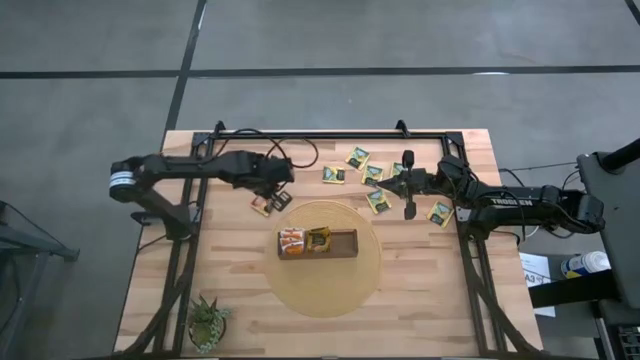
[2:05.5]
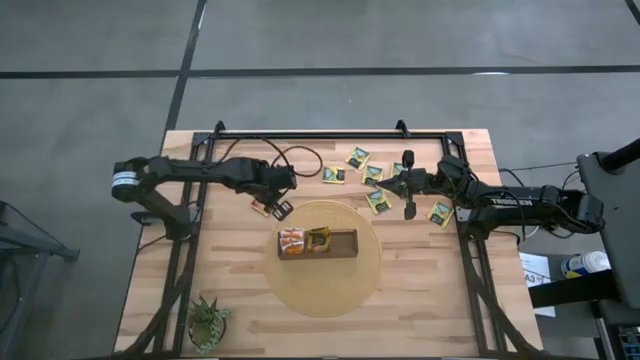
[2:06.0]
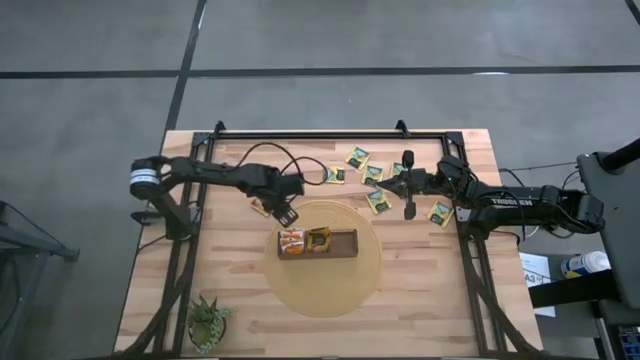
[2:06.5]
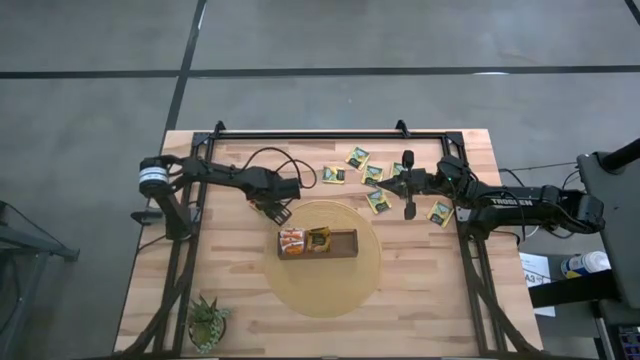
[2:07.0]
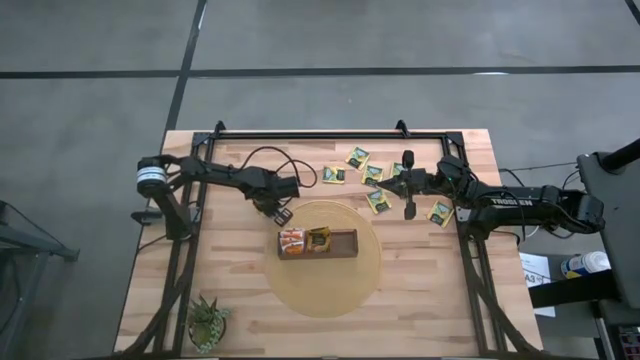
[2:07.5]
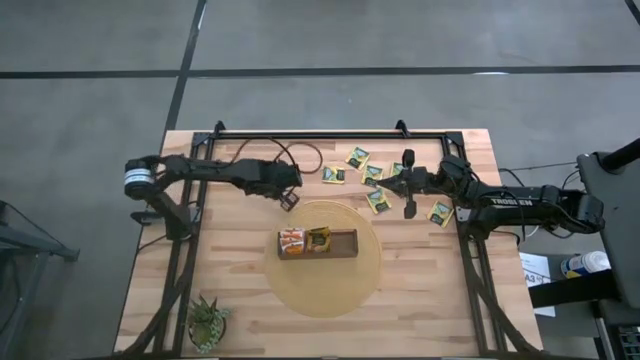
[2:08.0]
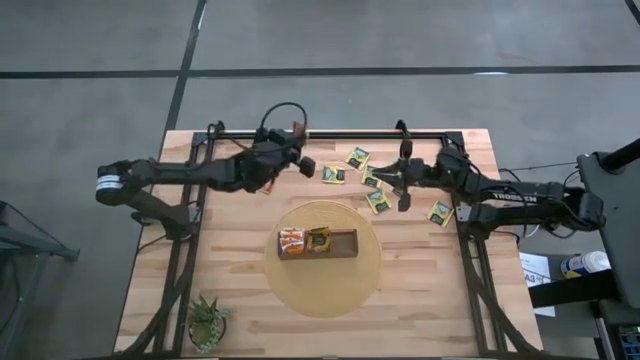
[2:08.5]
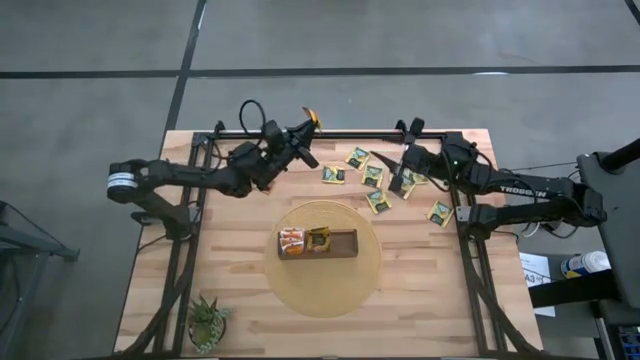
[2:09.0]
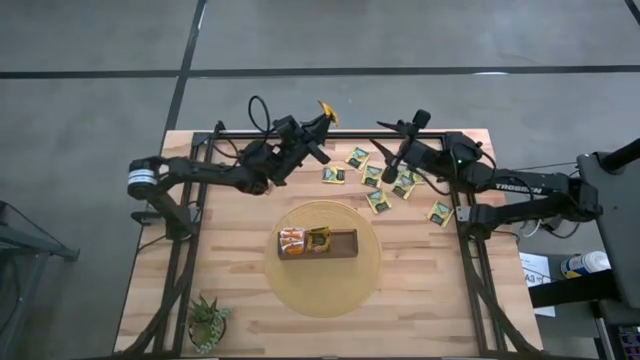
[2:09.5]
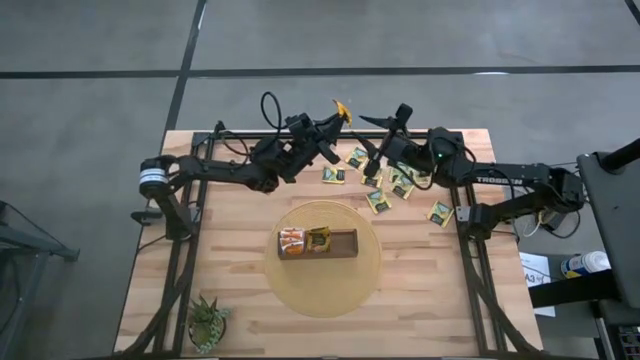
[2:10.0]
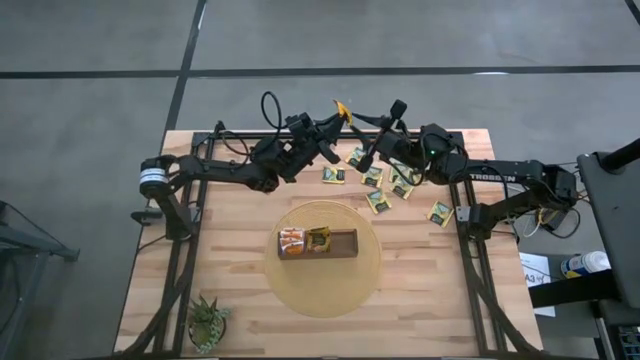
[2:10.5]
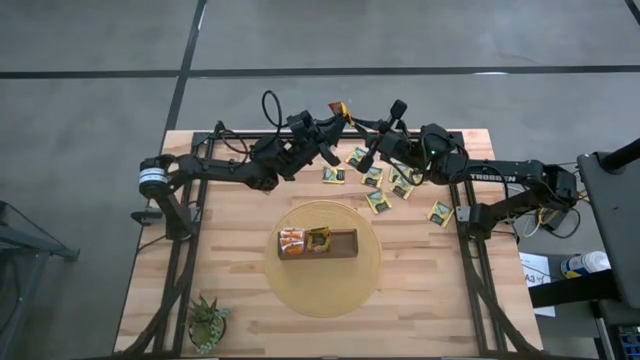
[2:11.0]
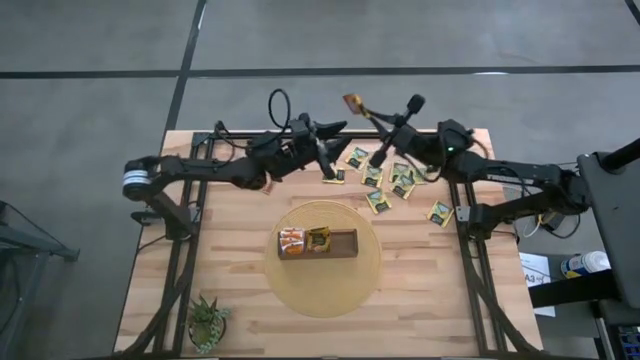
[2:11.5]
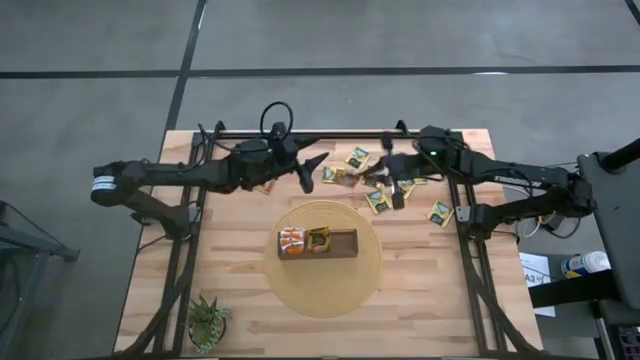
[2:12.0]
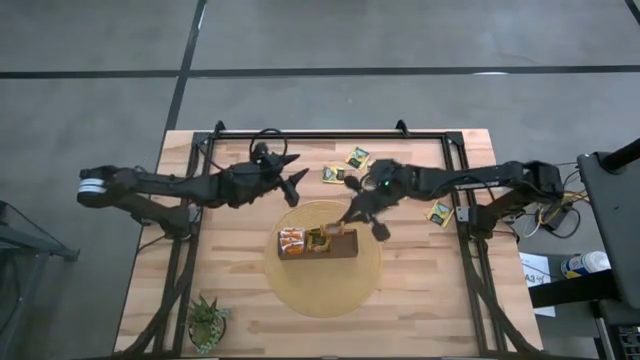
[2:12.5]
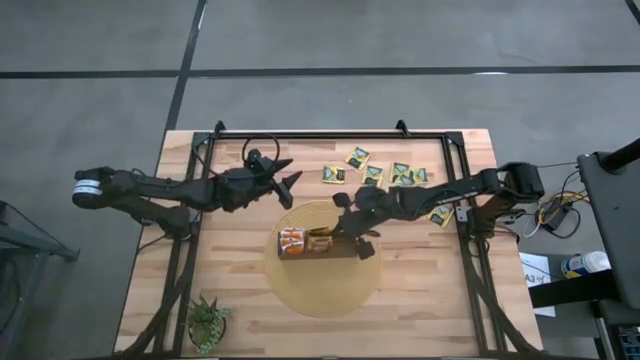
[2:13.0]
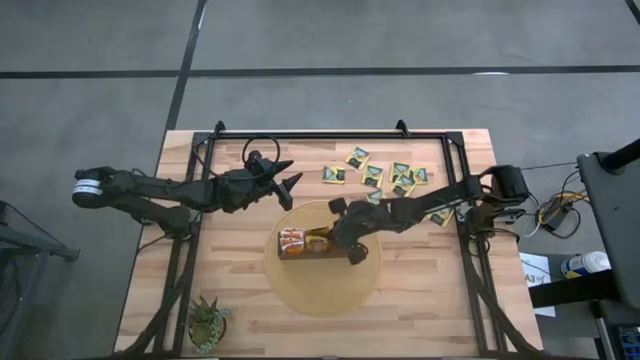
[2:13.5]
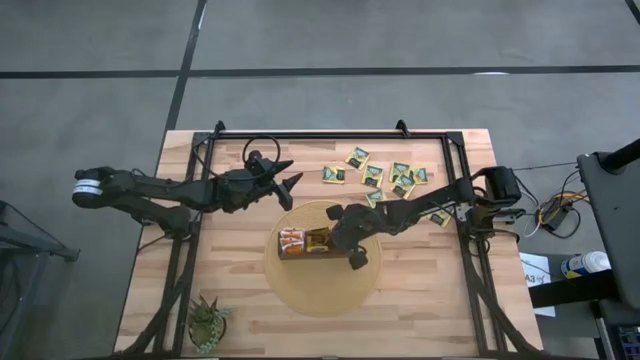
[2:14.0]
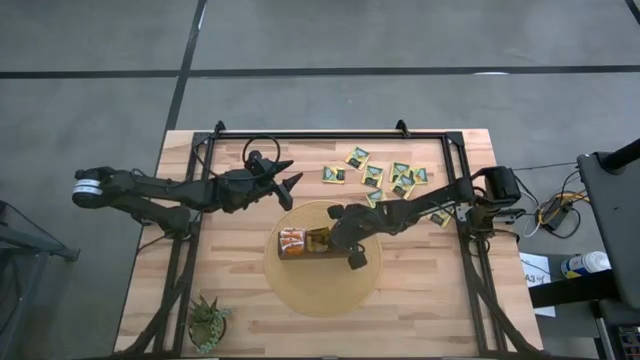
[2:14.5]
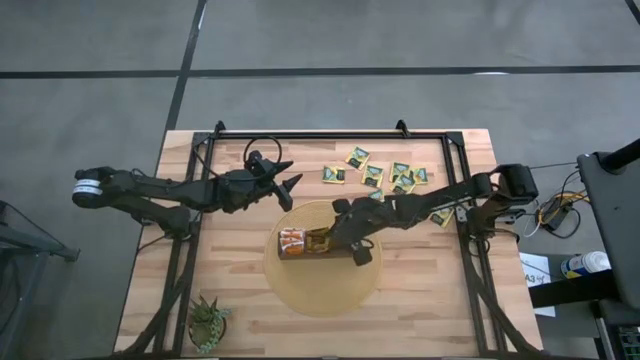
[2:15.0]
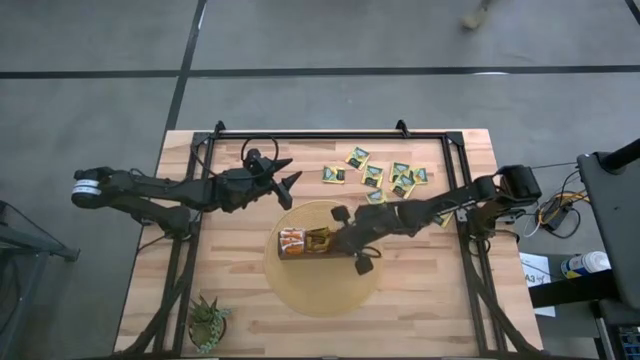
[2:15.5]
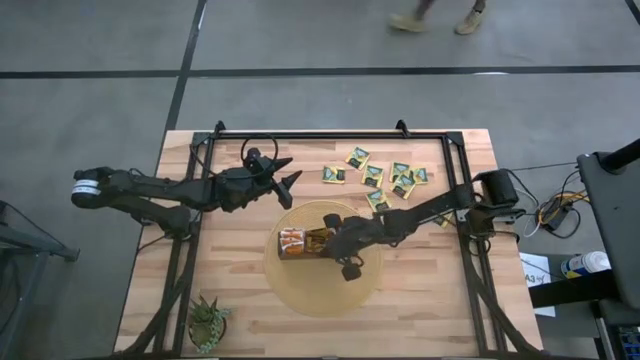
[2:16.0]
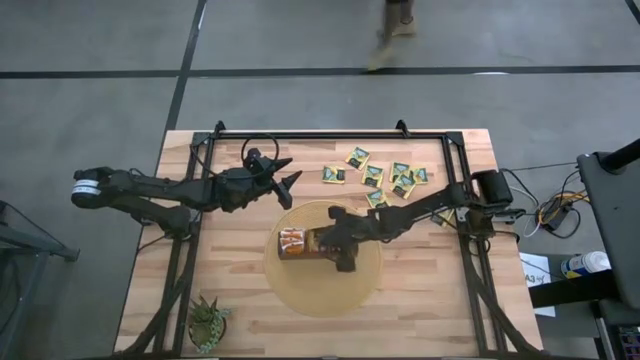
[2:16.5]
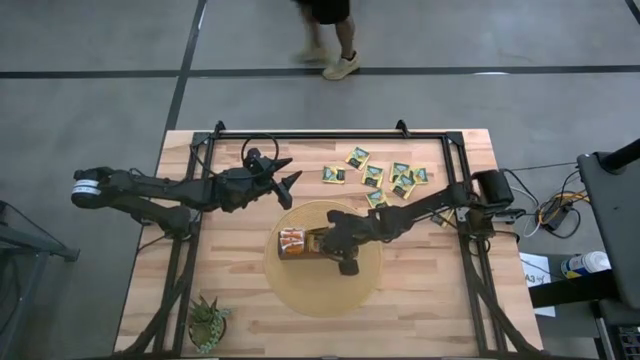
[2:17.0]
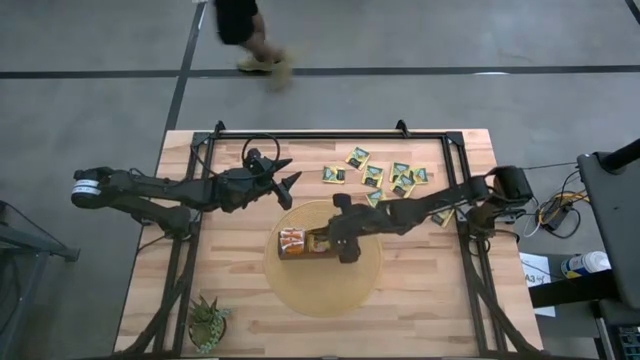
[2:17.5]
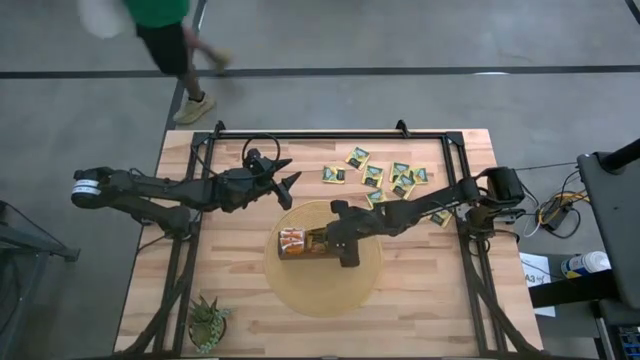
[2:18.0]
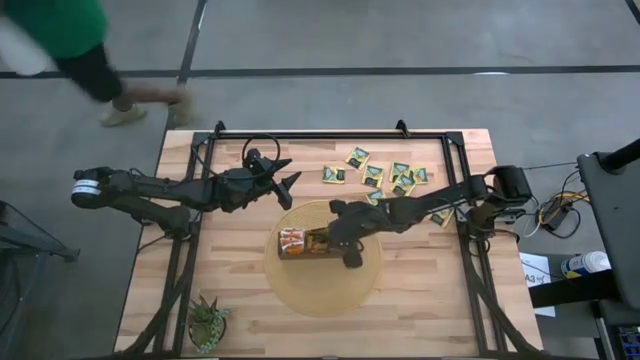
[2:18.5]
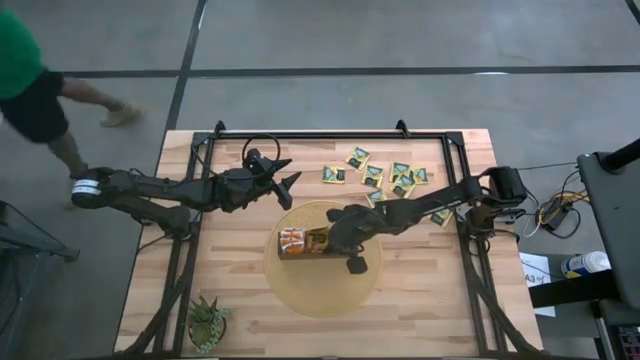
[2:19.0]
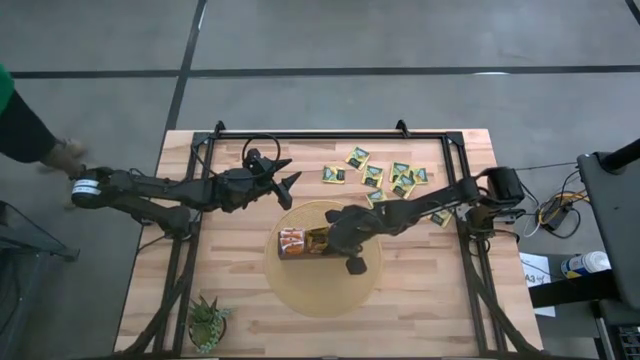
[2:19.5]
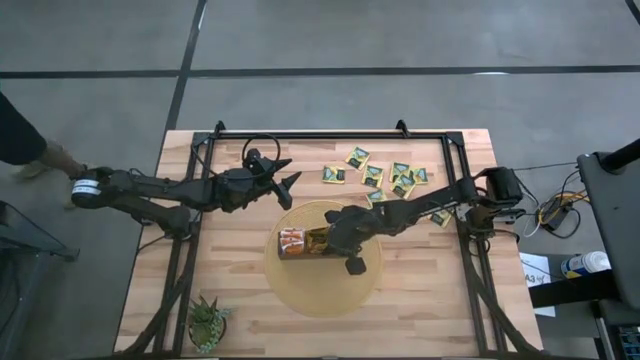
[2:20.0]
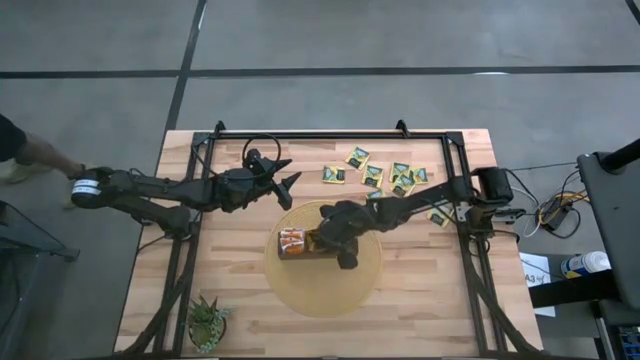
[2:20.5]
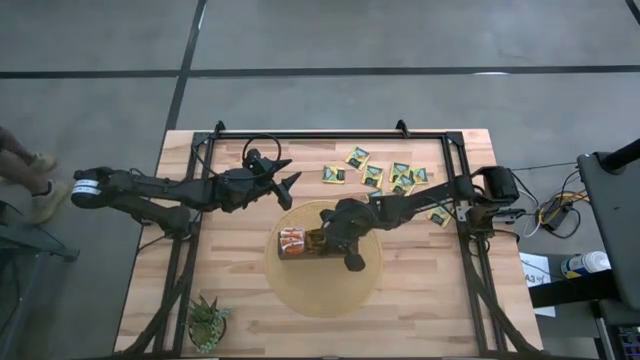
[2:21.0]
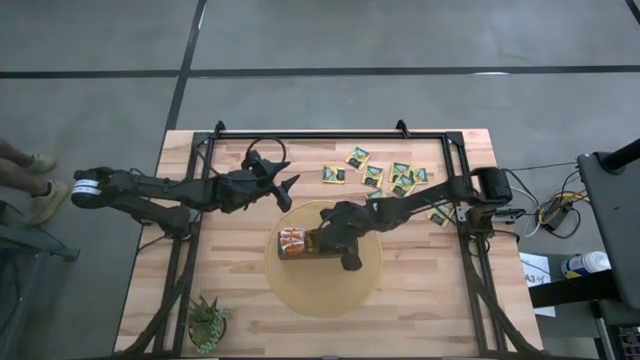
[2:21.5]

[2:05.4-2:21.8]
Task: Pick & Place Tea
Put the orange tea bag into the middle section of the wooden organizer

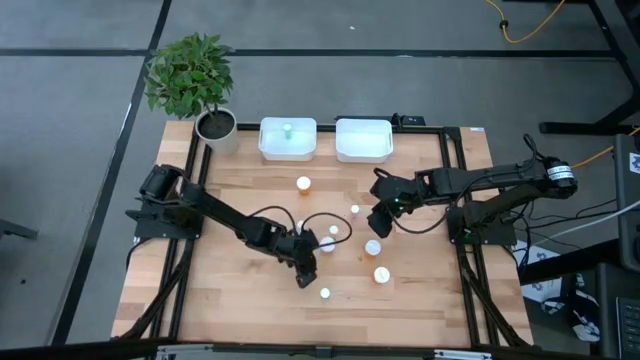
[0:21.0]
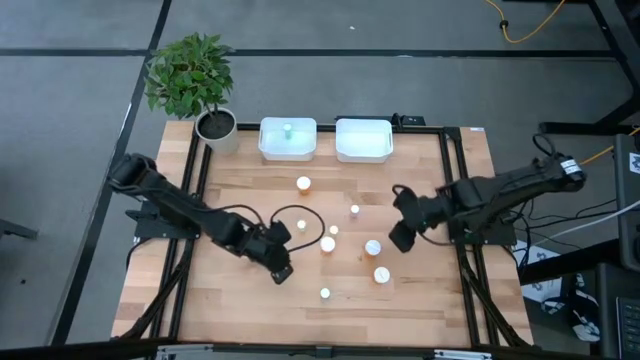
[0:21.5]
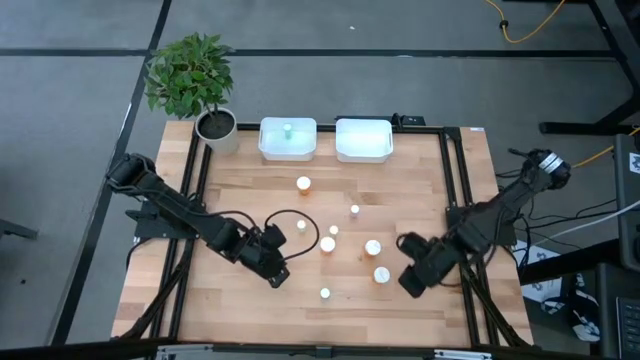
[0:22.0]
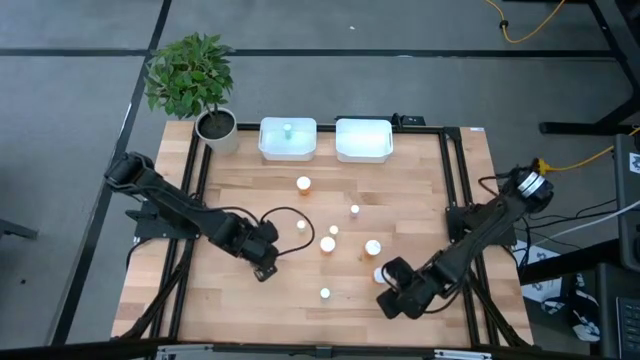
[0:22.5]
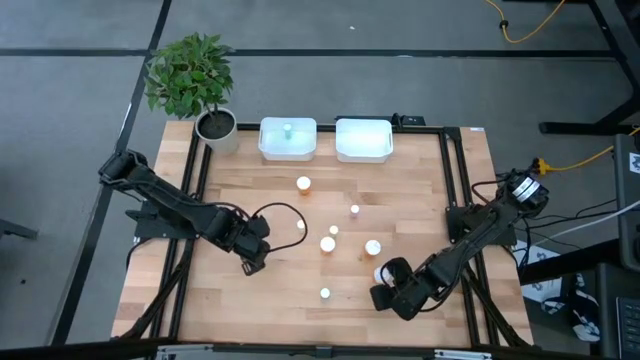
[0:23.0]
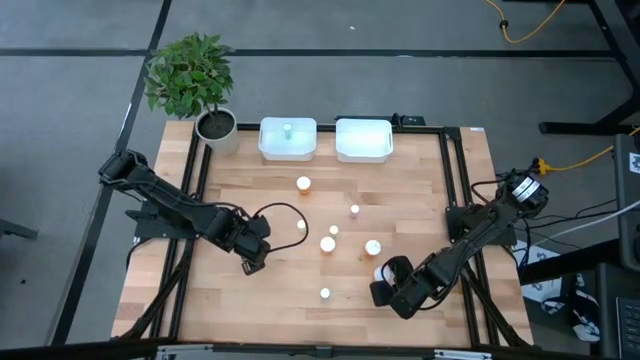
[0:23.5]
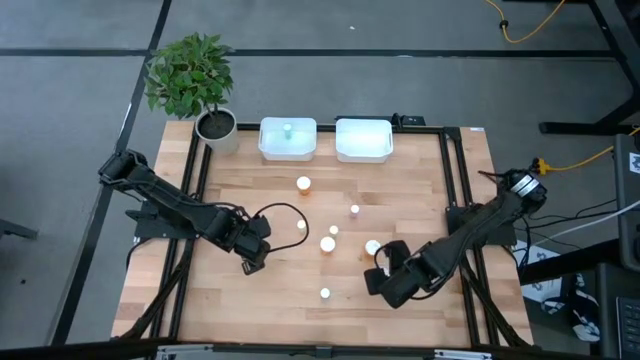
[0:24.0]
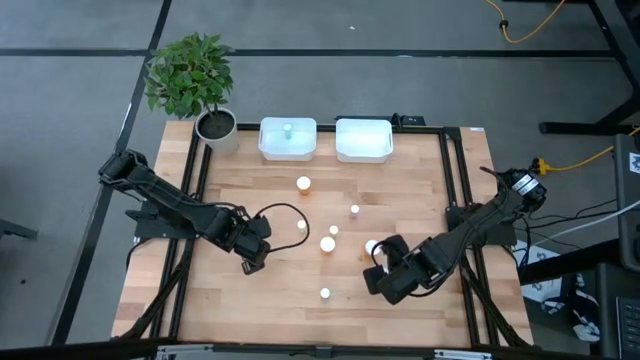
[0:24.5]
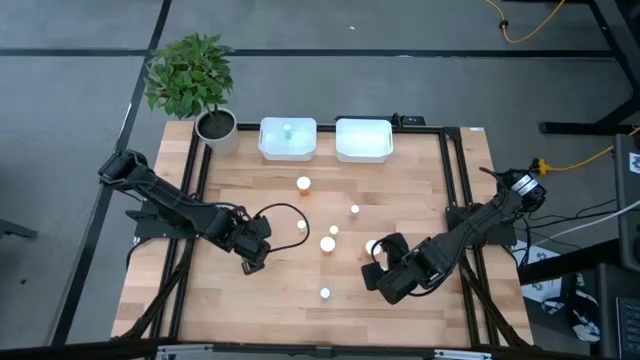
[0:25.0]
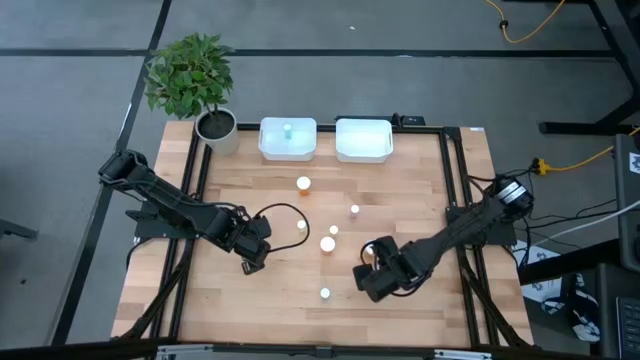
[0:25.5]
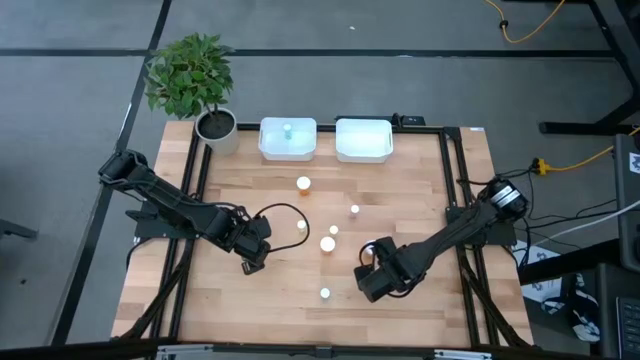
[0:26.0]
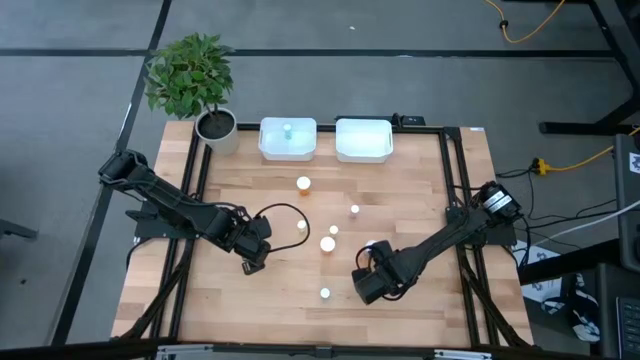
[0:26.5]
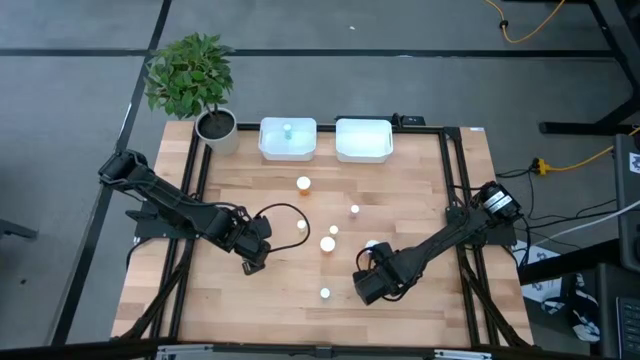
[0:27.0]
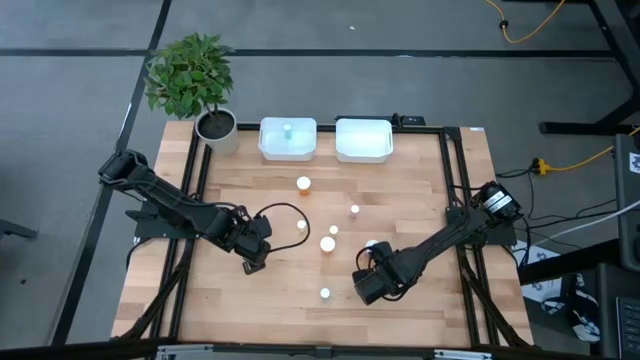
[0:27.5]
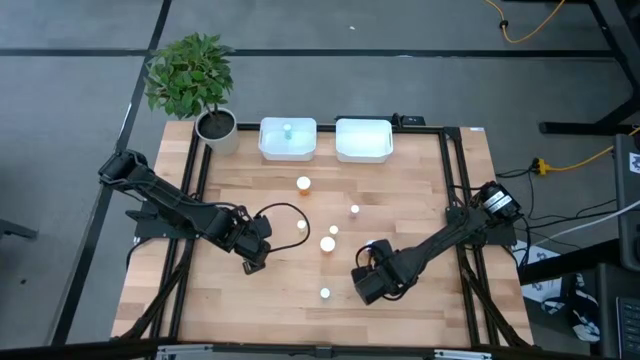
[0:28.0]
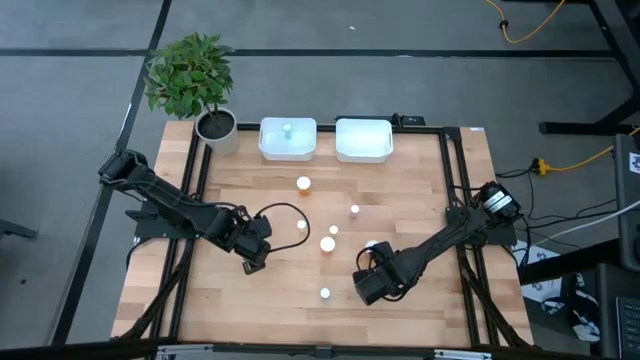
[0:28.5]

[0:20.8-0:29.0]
Task: Pick and place medicine bottles into bin by pill shape (circle, oval)
Put the orange capsule bottle into the right white bin
